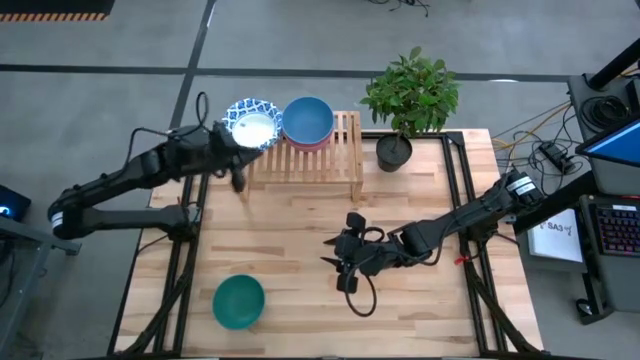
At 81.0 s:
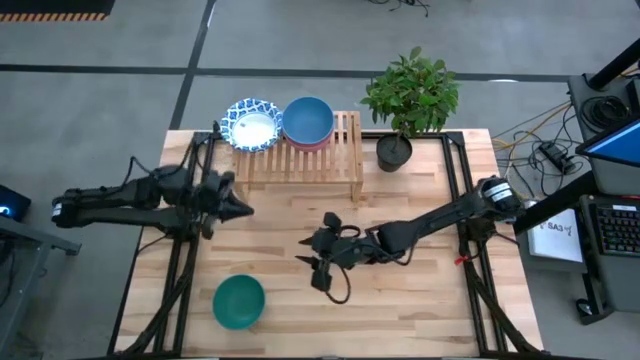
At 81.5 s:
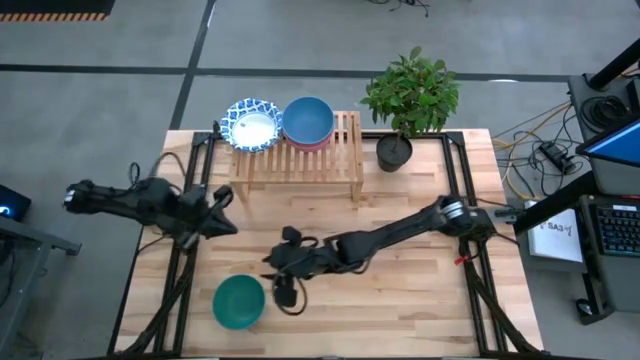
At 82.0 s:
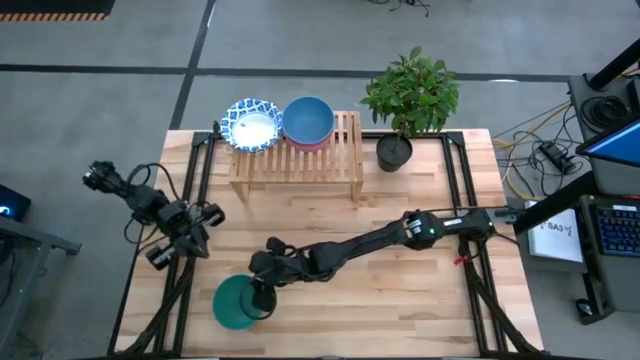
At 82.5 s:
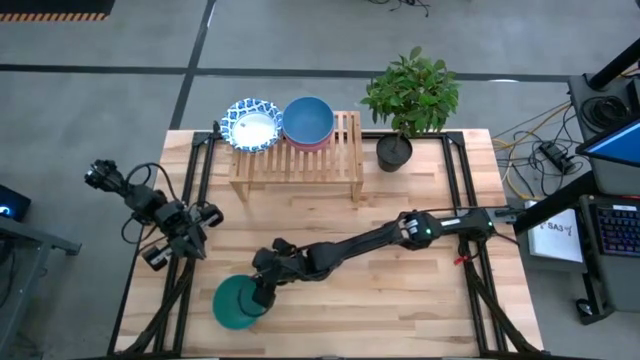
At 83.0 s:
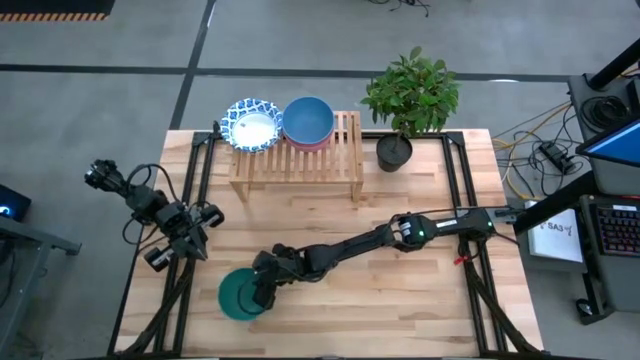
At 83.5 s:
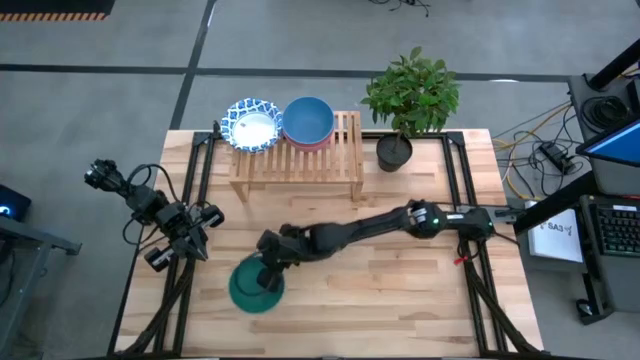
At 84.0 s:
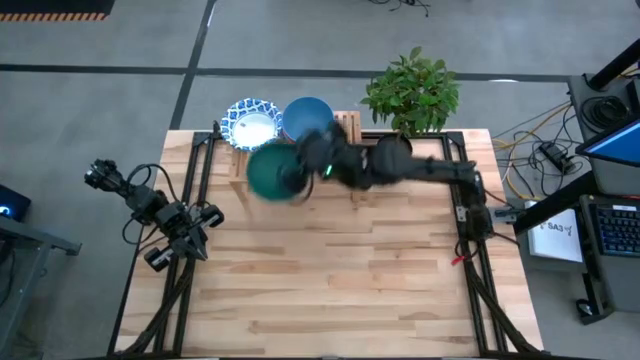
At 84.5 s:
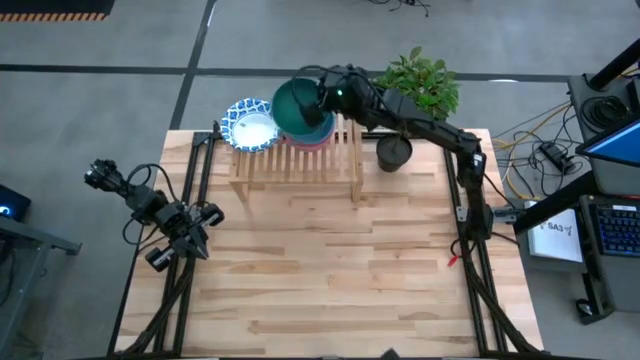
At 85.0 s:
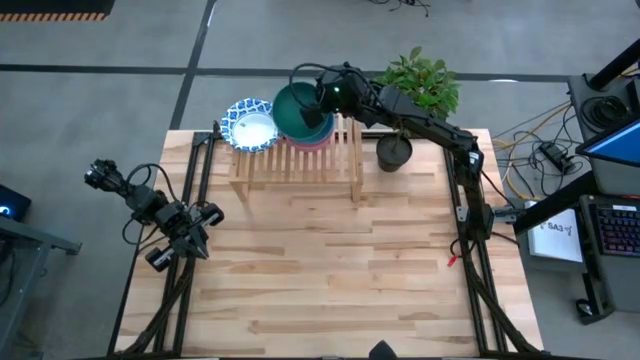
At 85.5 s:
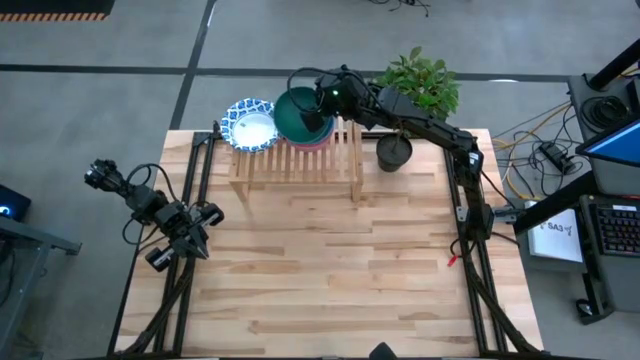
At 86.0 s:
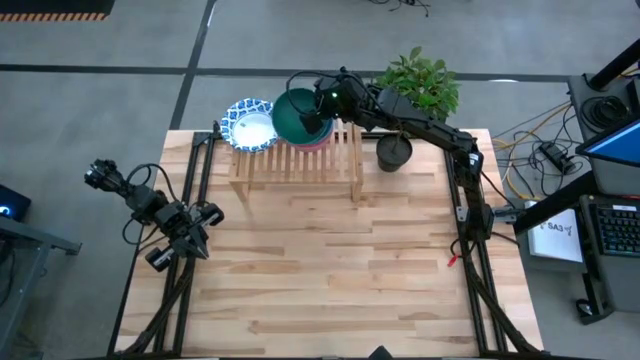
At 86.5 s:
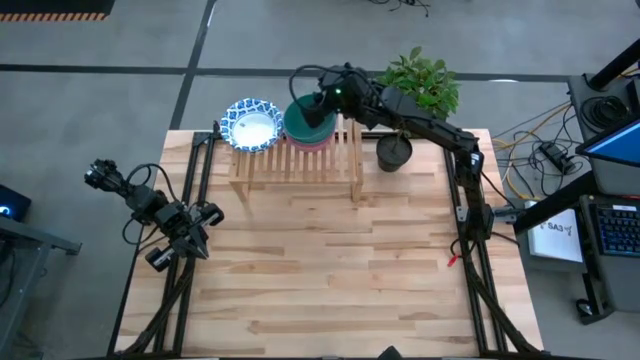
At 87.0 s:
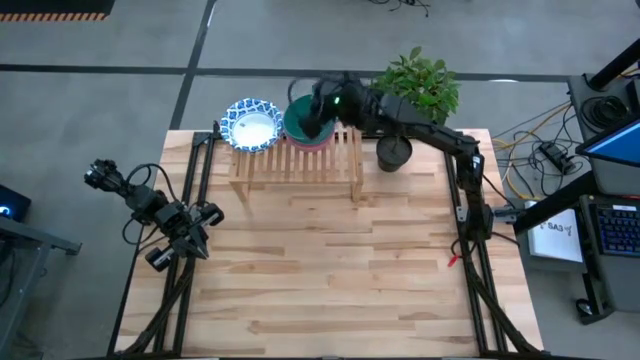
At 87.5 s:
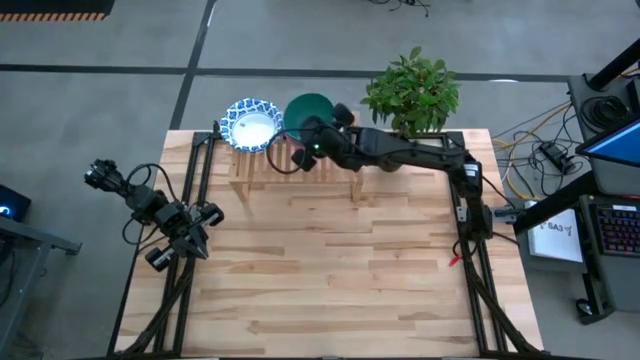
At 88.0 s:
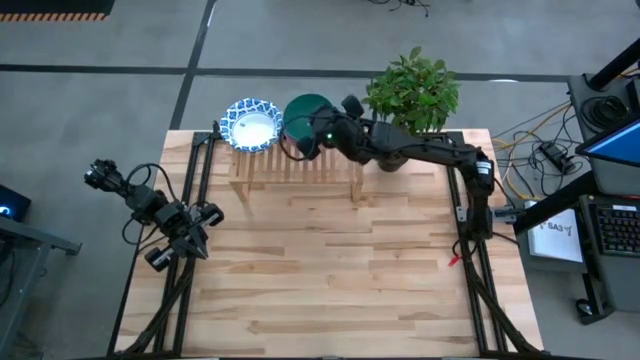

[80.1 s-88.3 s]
Task: Place and stack bowls onto a shelf
Stack the dark green bowl on top of the blue bowl on the shelf

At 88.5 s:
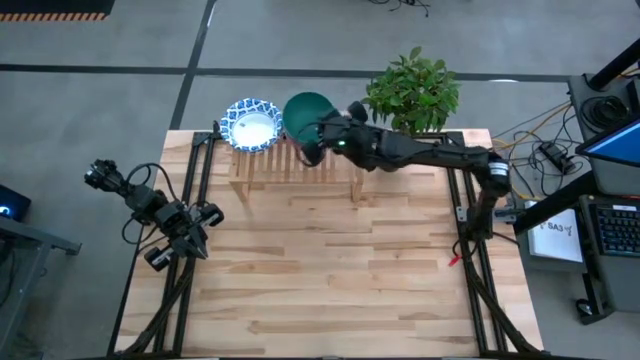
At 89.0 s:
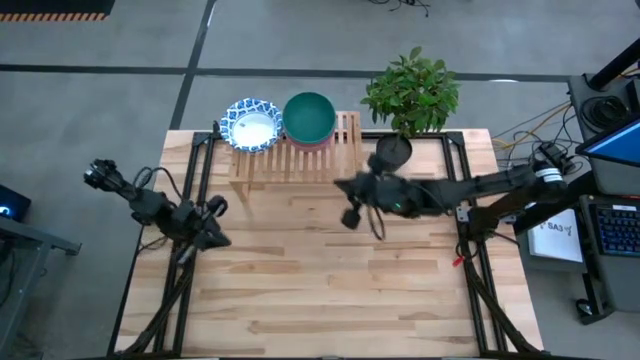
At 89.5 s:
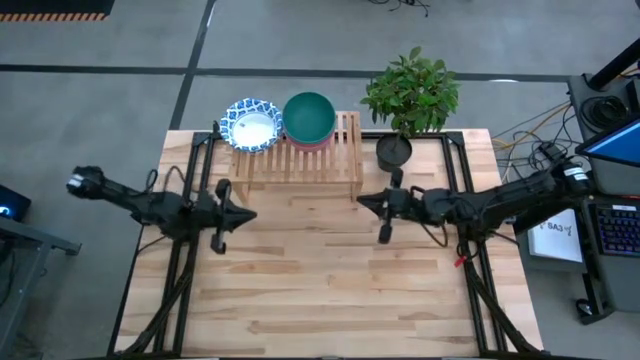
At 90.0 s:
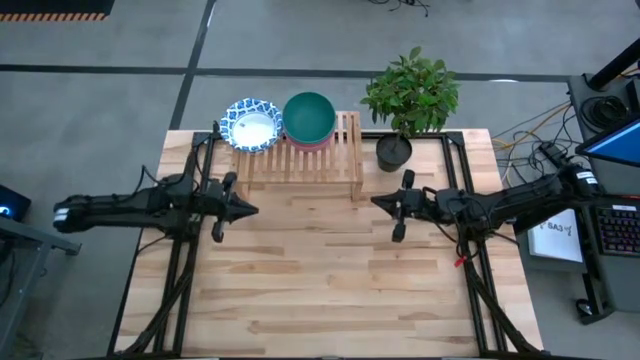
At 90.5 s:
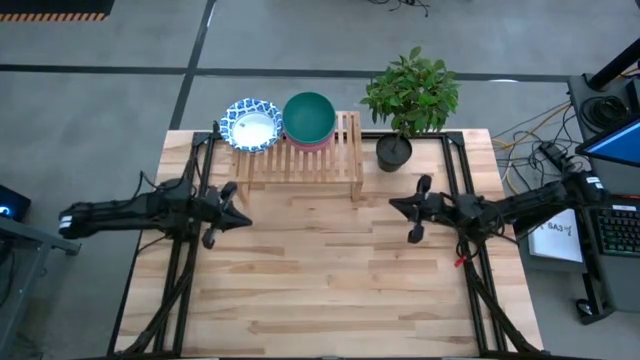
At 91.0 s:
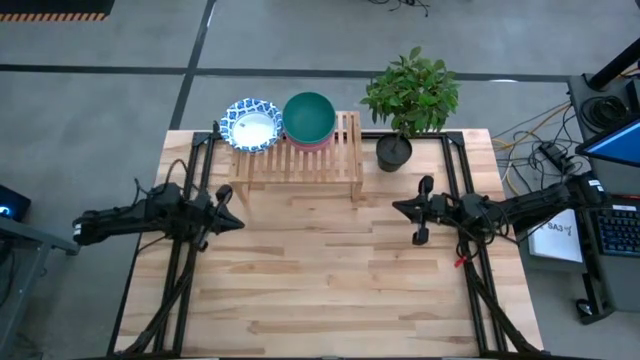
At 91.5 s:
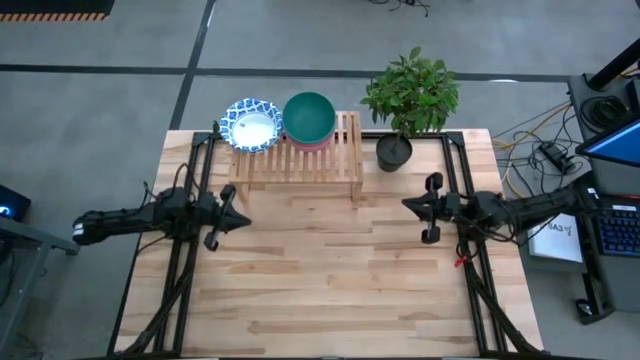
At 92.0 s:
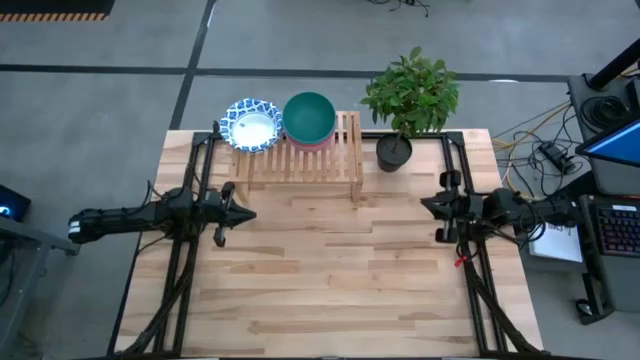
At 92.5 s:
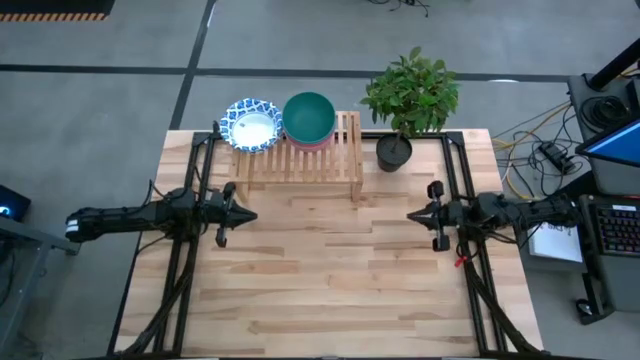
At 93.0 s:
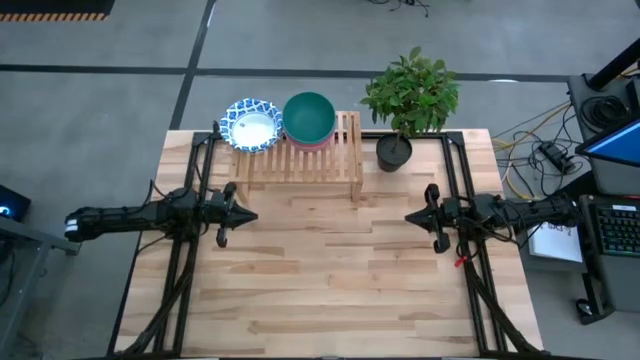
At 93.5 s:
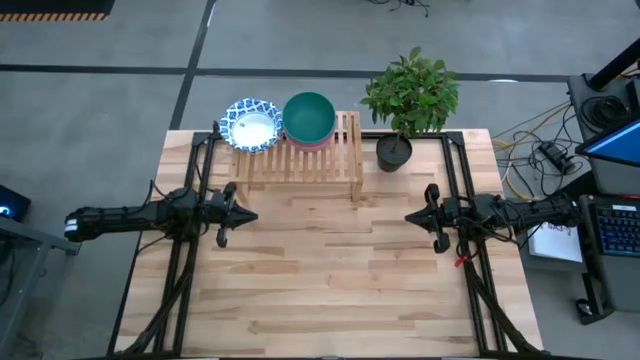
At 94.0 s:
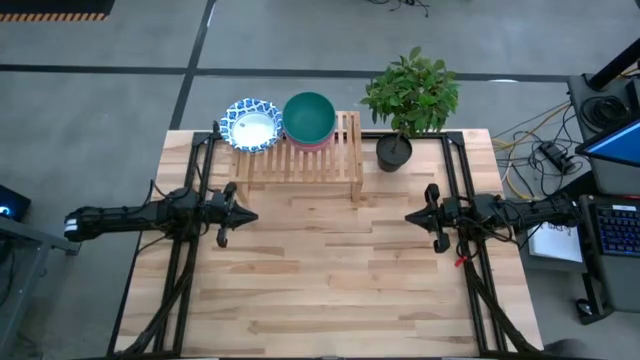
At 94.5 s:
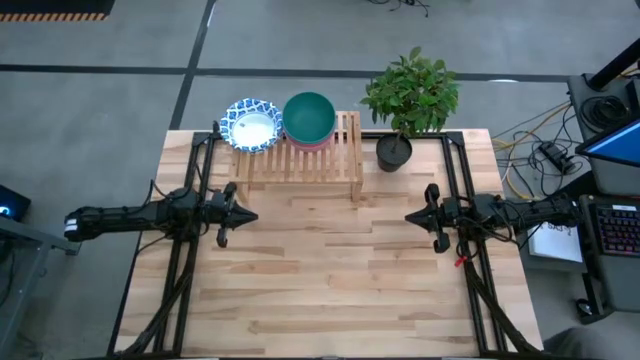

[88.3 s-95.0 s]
Return to Home Position

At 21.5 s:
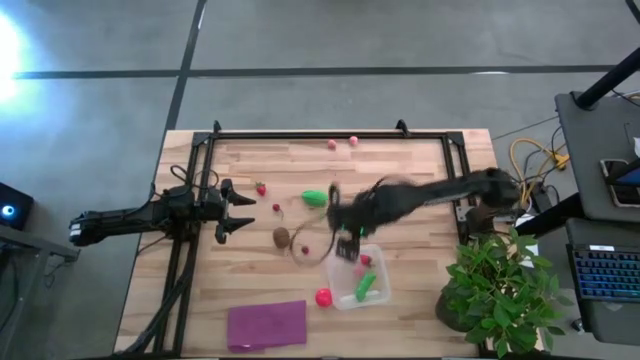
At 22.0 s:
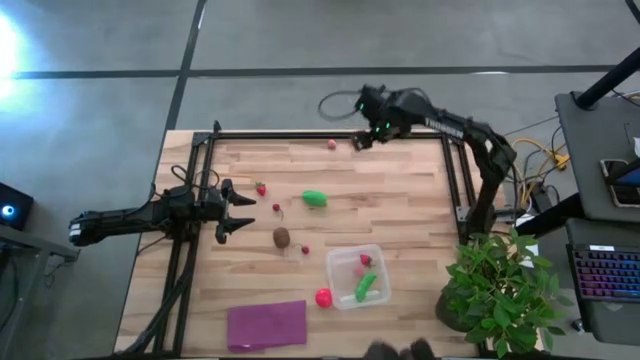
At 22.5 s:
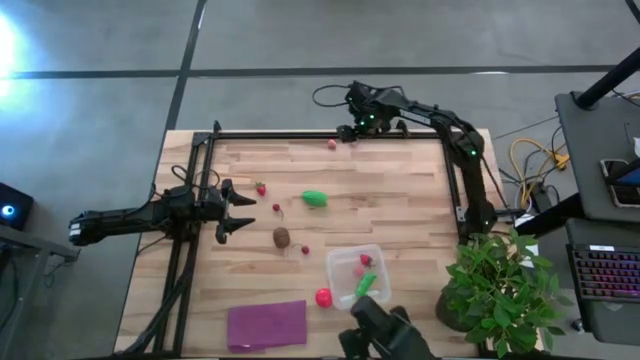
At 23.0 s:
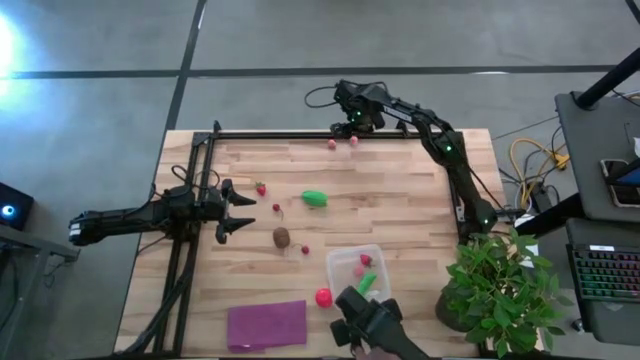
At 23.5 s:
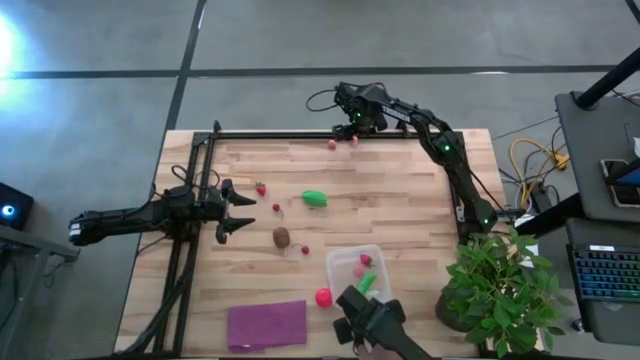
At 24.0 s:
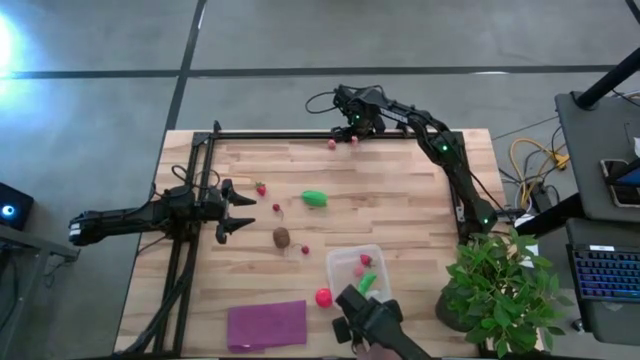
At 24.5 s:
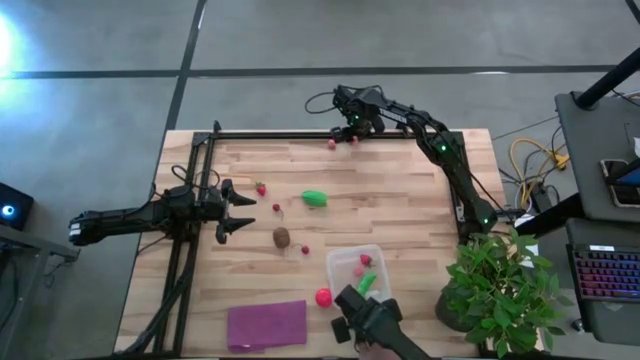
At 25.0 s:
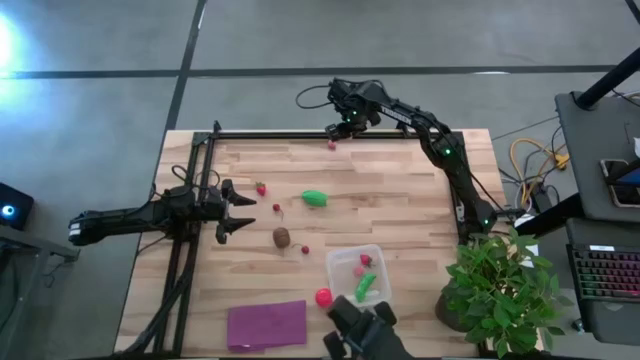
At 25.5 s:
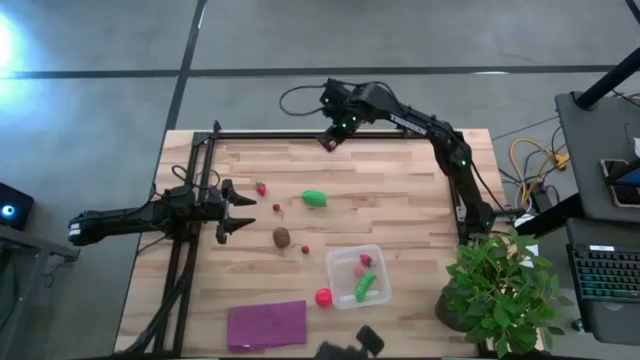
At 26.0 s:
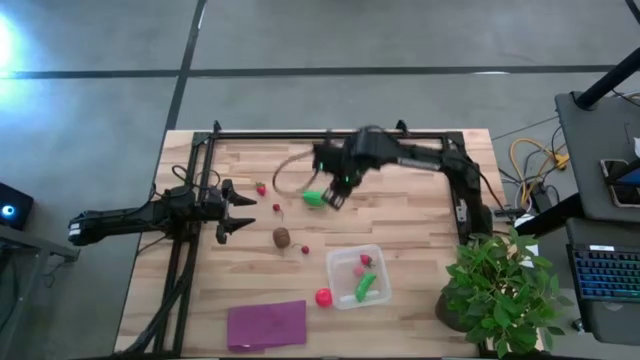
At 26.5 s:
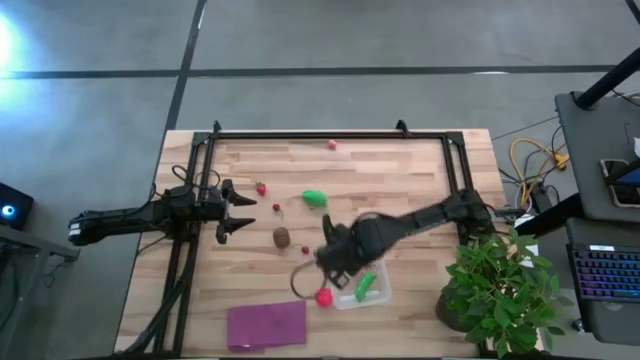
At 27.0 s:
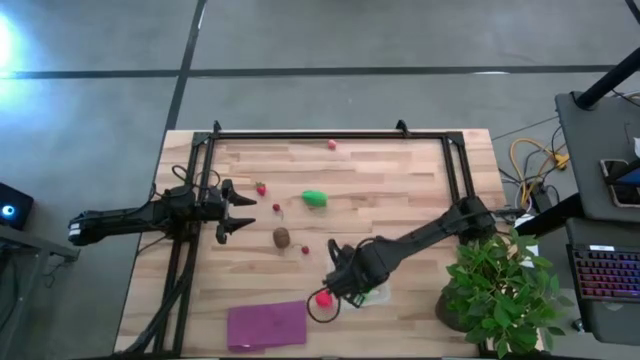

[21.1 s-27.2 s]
Task: Pick and placing Produce into tupperware
Put the right pink peach into the transparent container
